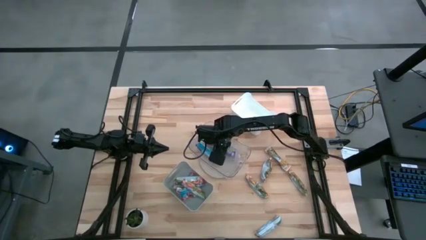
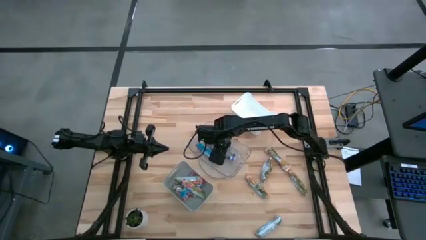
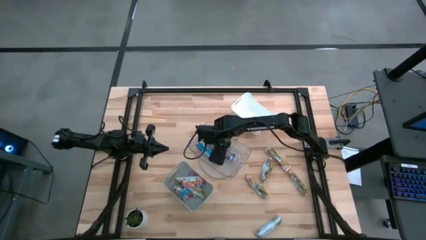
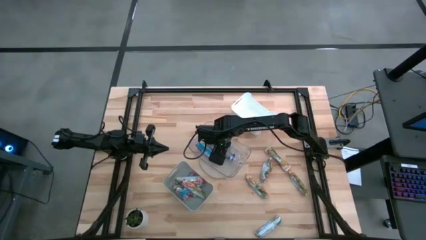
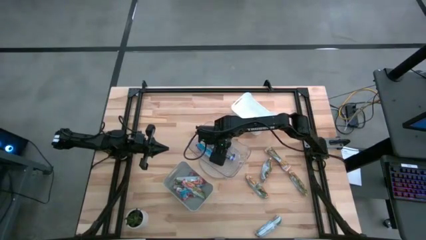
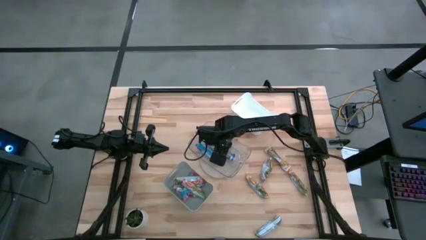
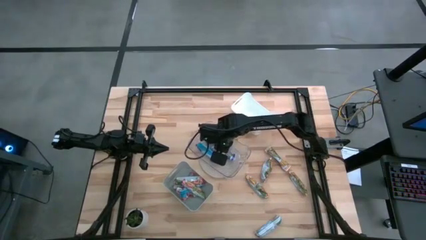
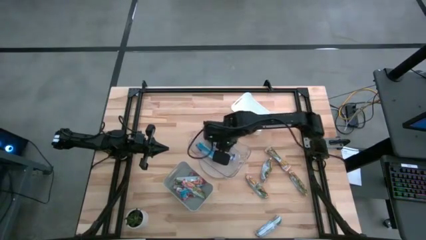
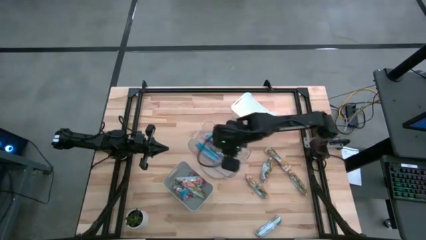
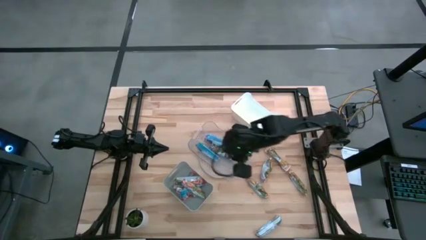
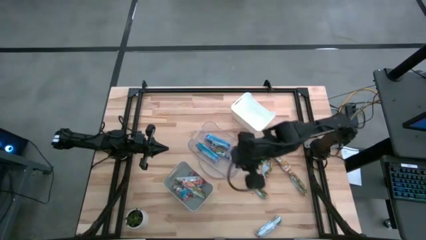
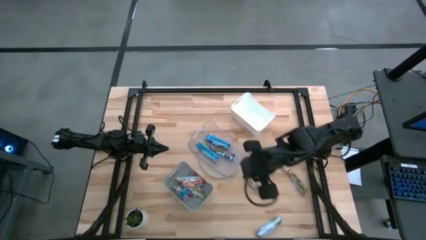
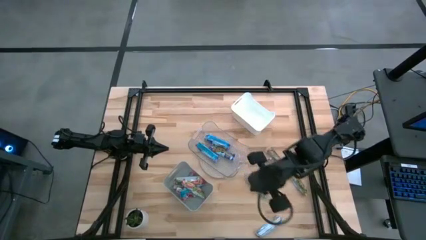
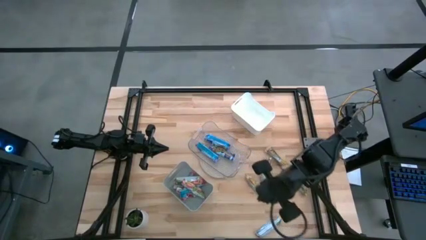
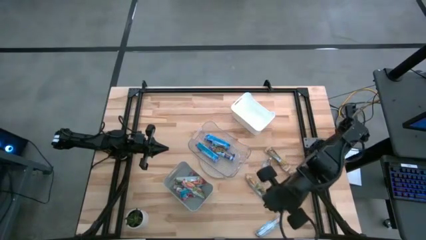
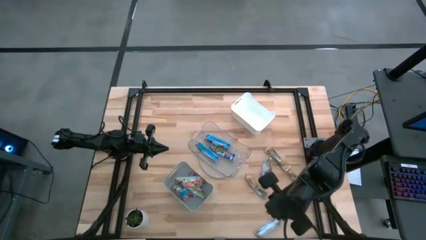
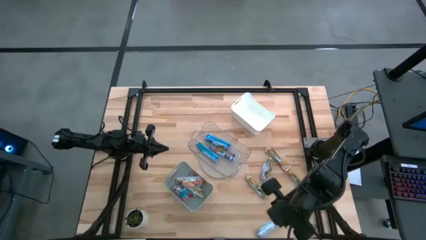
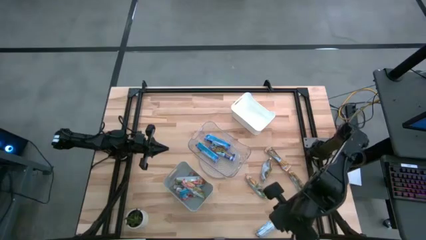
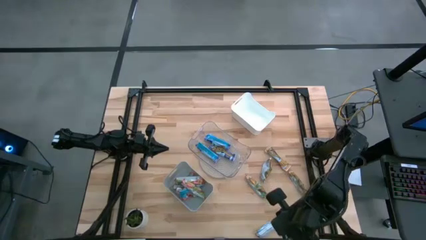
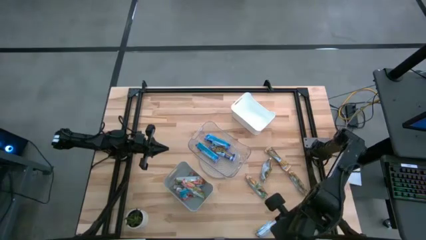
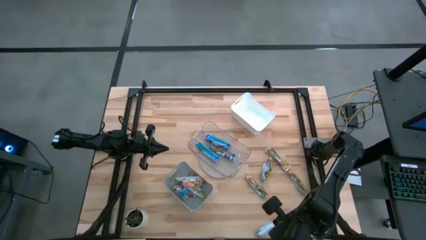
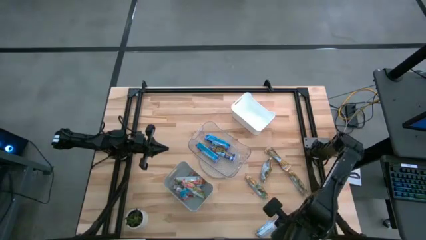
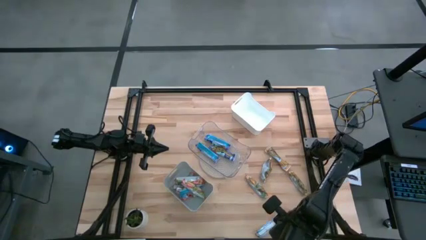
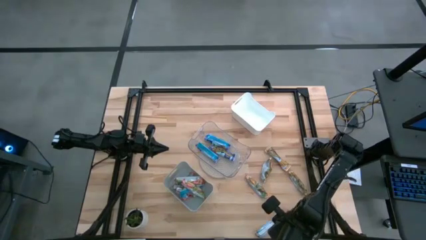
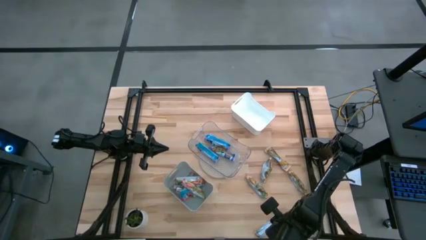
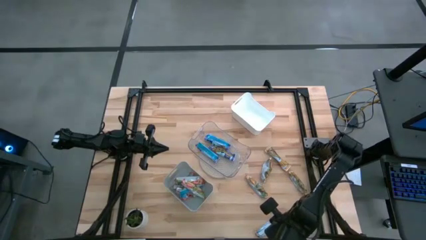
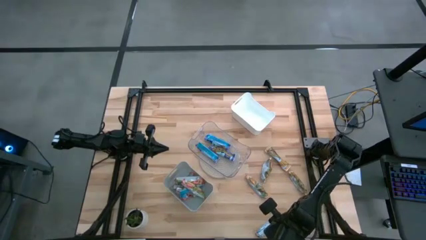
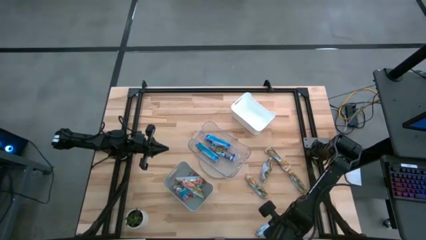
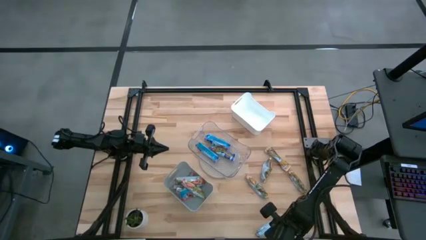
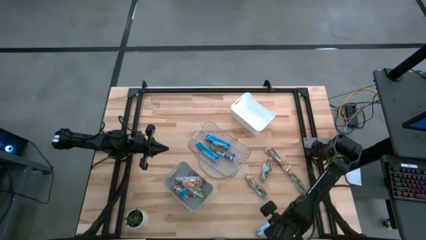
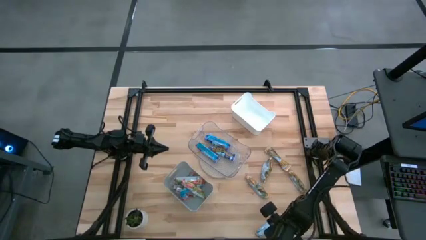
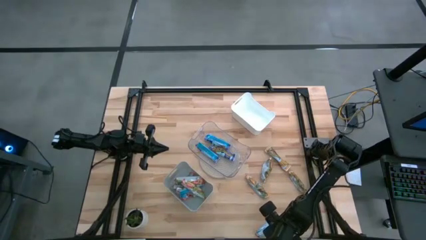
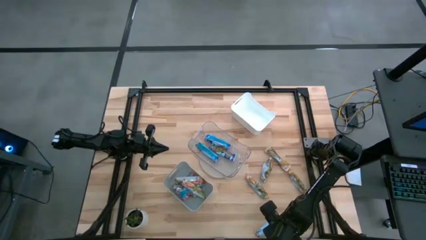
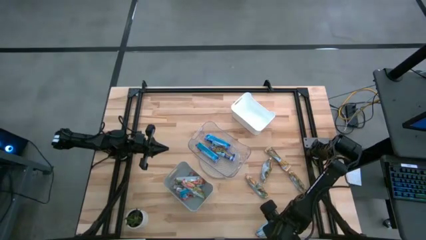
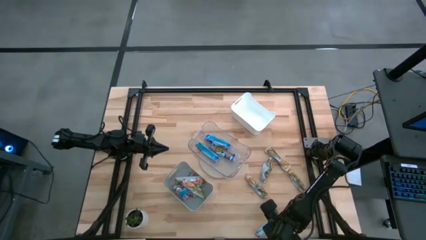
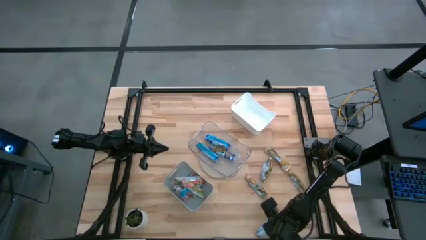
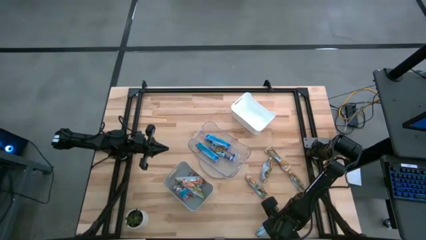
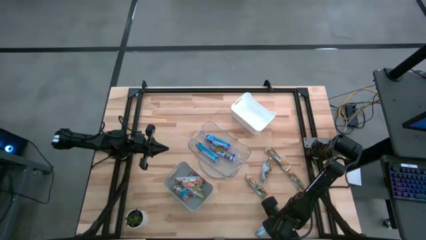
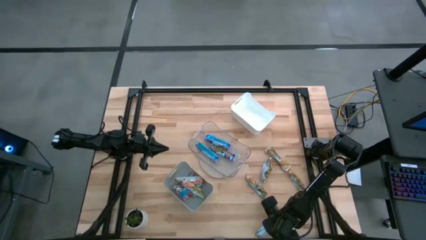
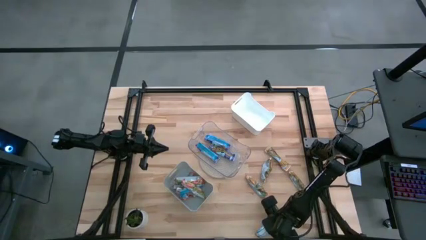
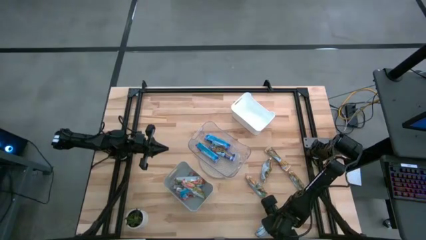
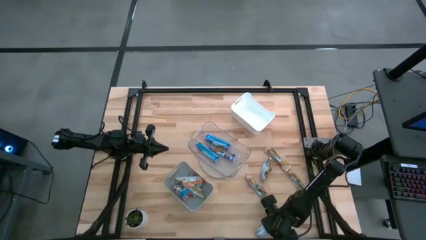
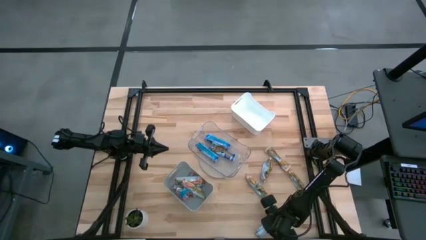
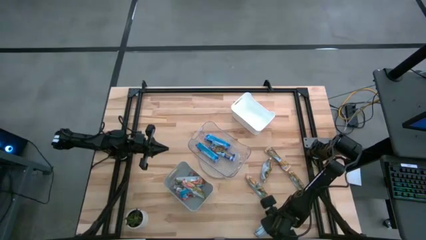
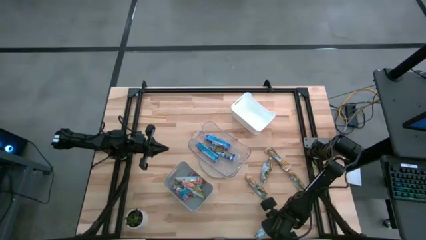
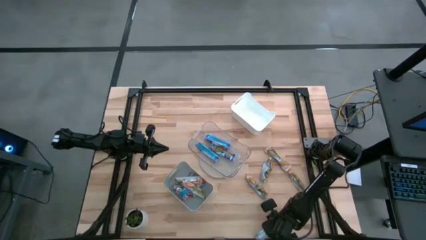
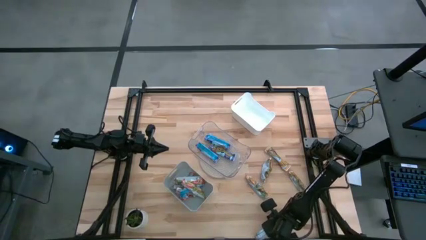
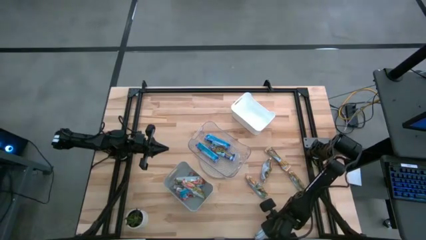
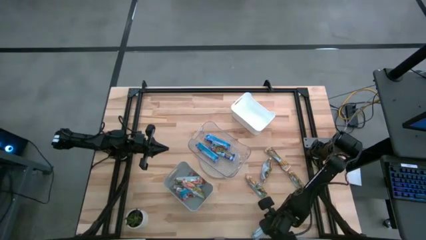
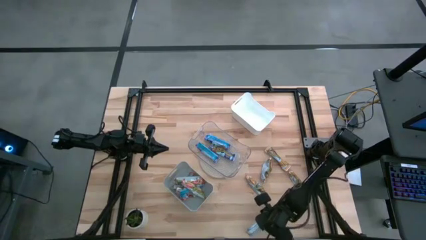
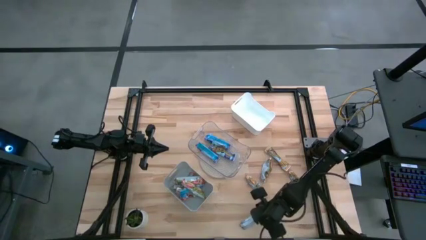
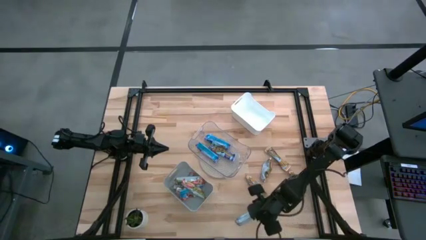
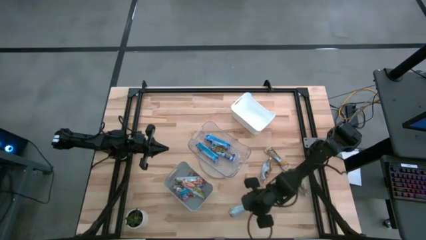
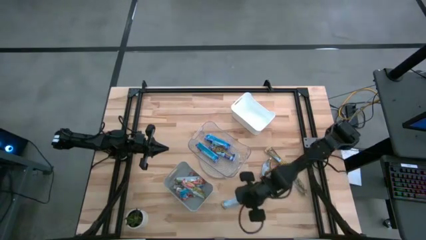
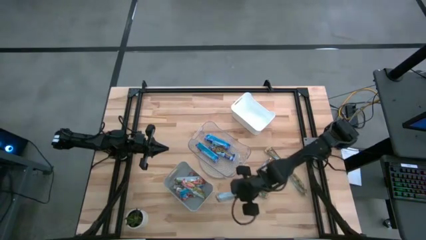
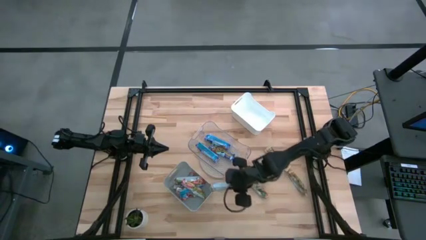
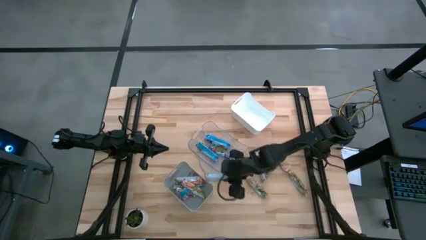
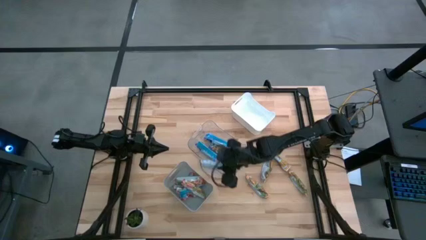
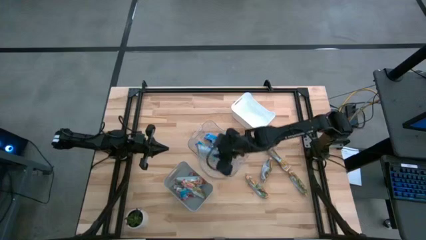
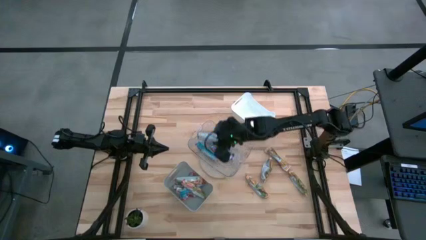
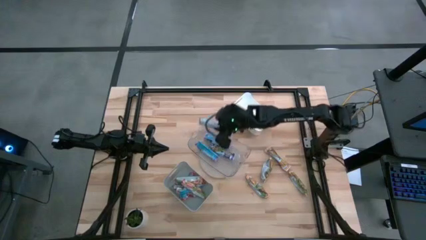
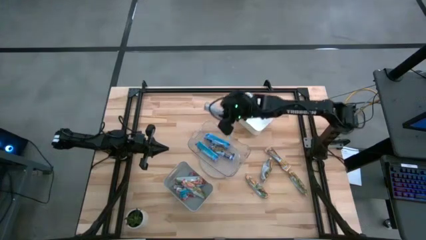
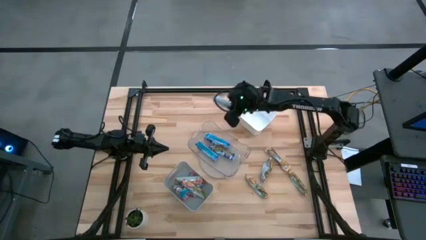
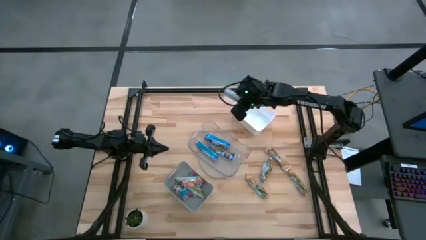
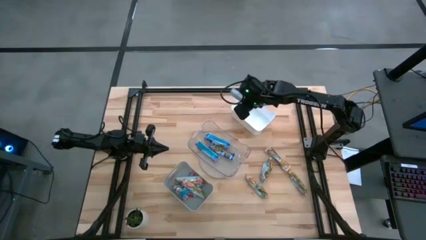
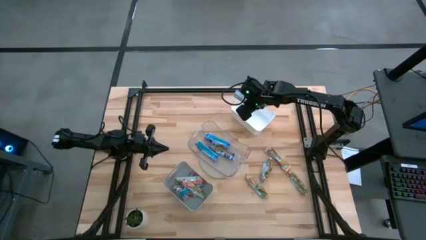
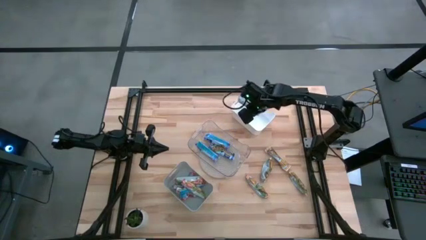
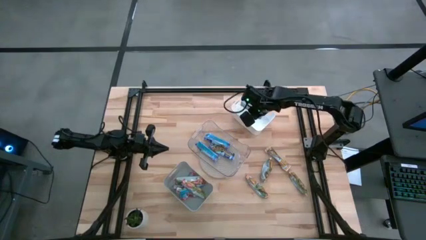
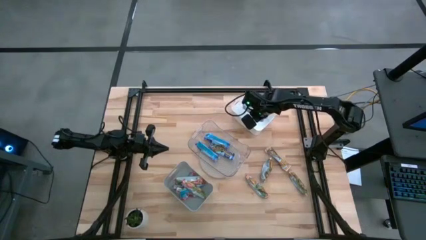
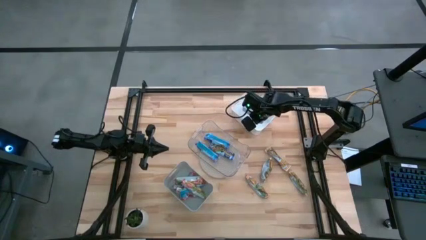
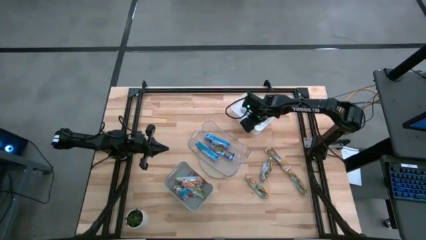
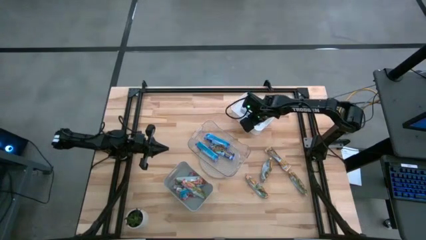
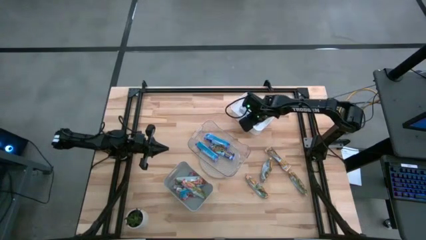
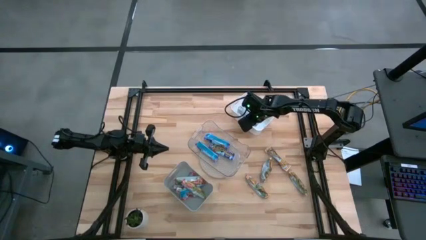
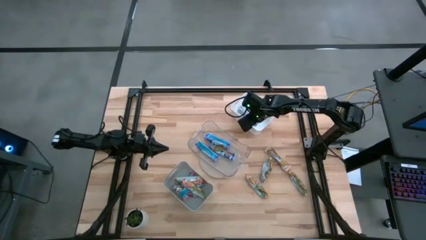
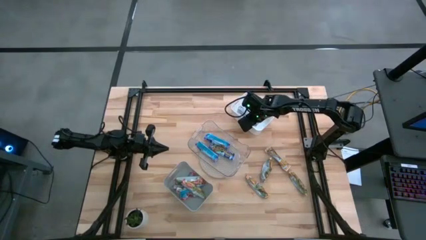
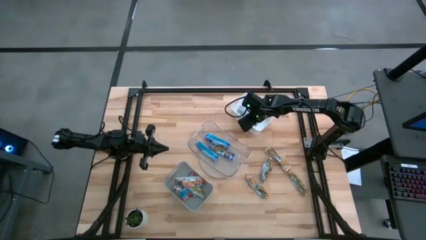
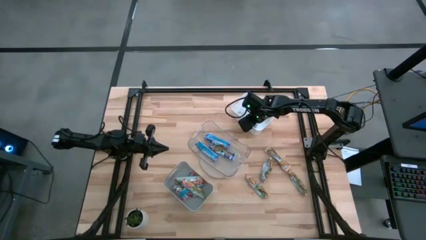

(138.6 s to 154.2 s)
Task: Pick and place Granola Bars by type
Put the yellow granola bar into the white bin
